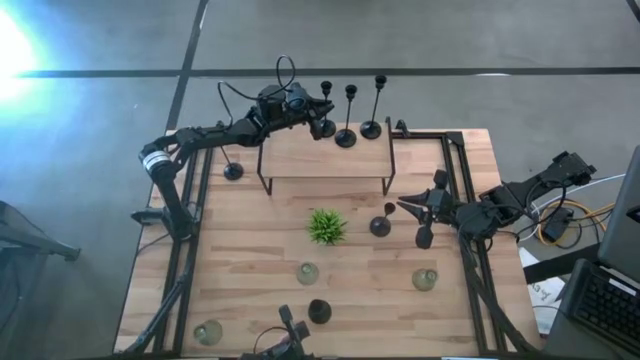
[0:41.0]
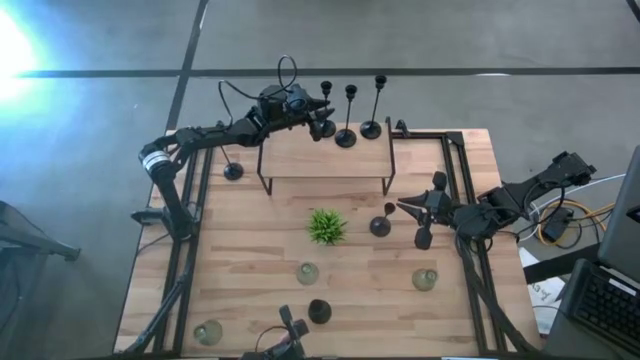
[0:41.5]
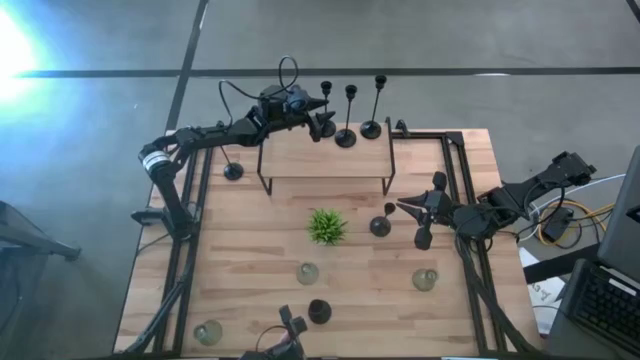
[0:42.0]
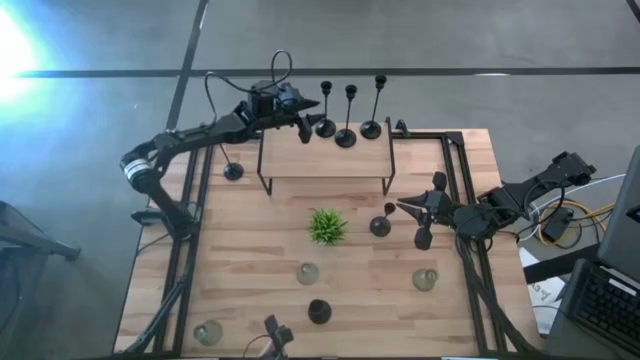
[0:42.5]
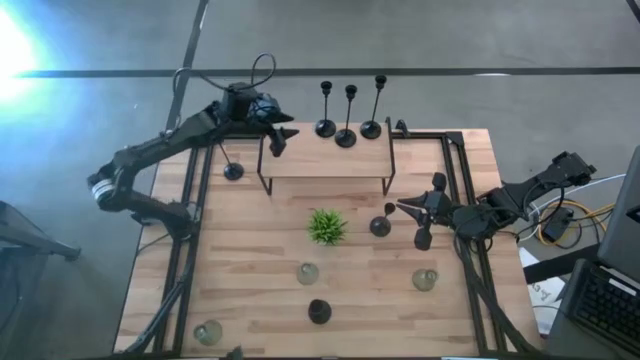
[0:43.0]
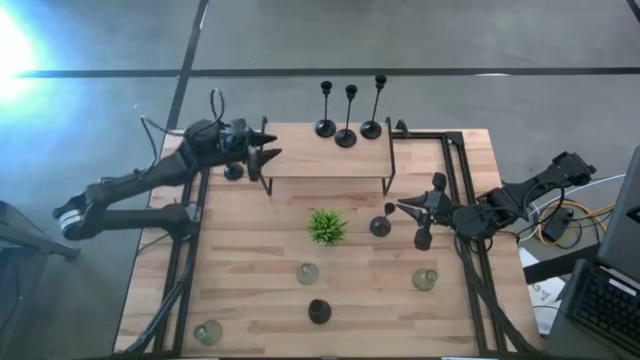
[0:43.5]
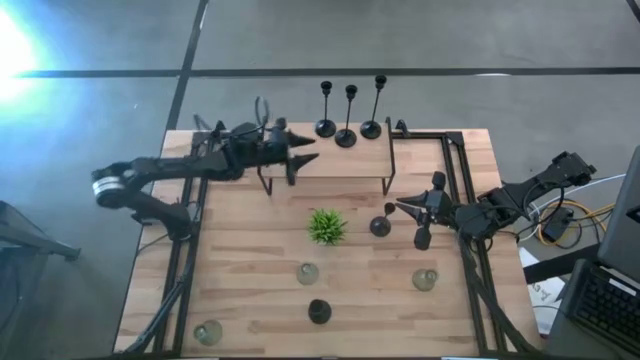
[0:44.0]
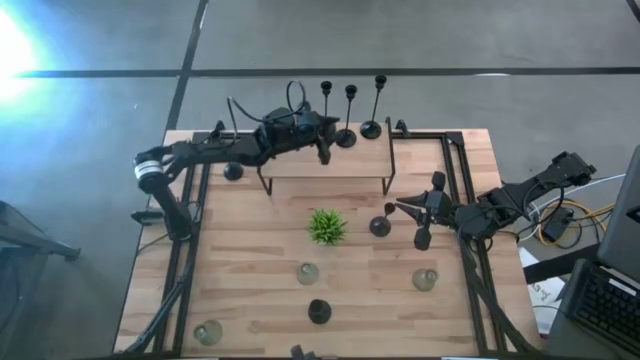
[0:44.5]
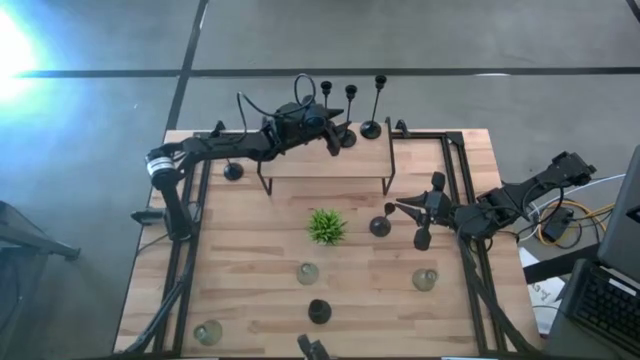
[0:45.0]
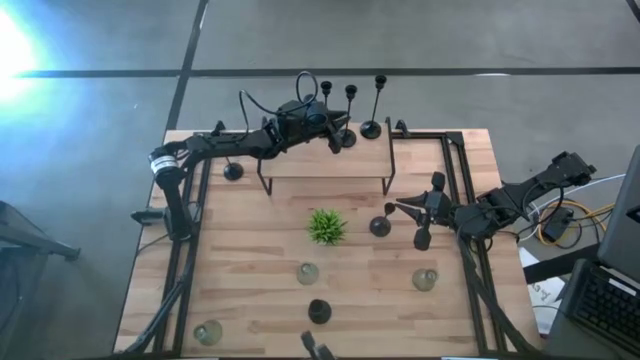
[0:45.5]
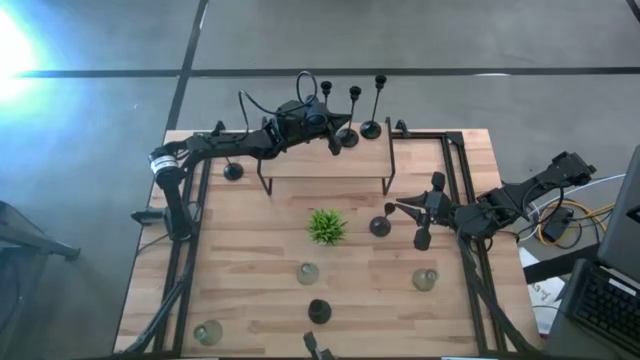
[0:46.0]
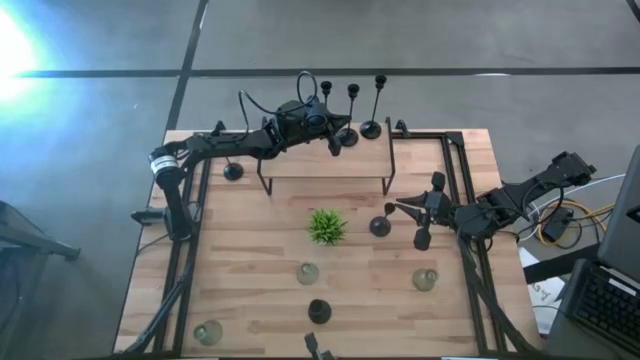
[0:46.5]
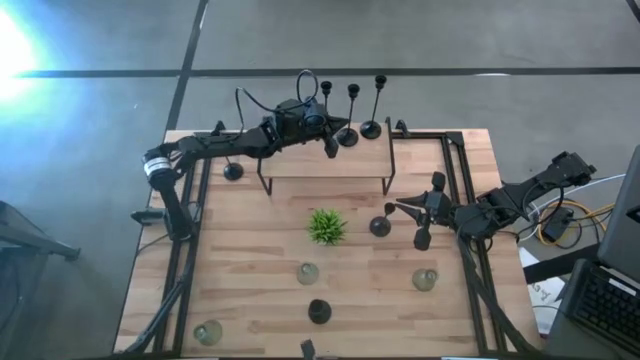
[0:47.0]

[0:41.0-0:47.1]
Task: Pick & Place candle stick holders
Adjust the large black candle holder on the shelf

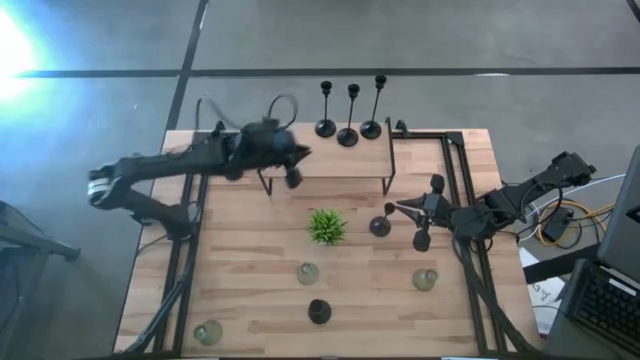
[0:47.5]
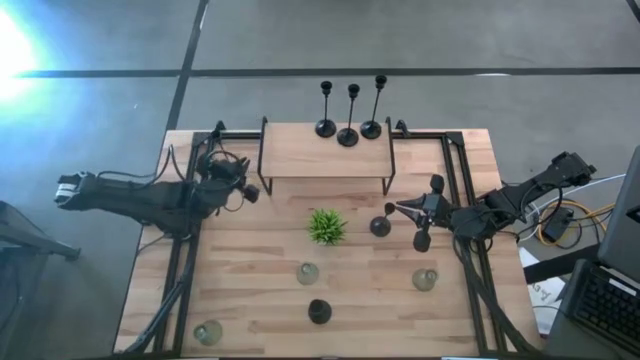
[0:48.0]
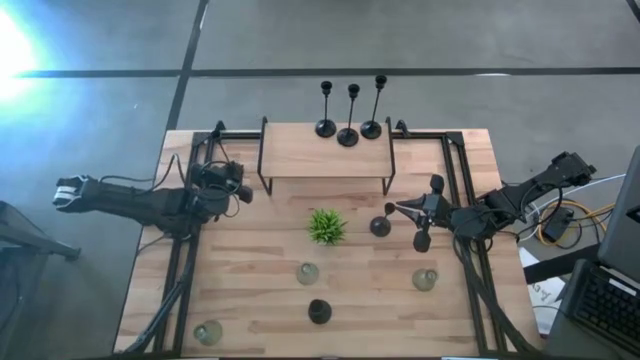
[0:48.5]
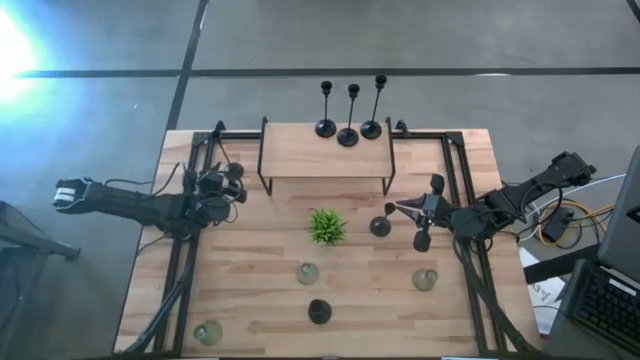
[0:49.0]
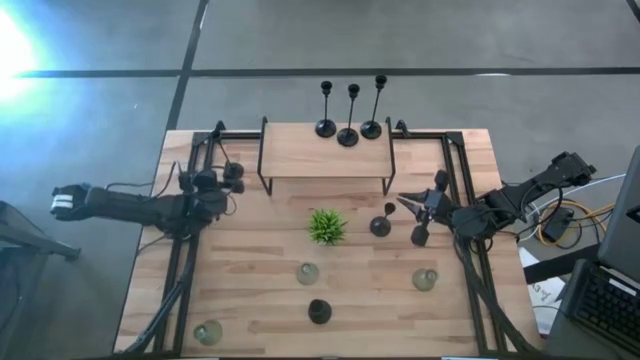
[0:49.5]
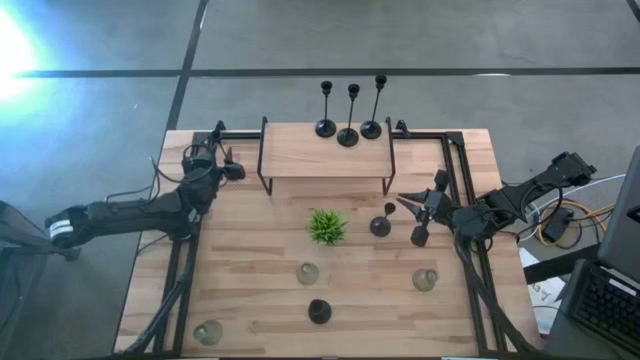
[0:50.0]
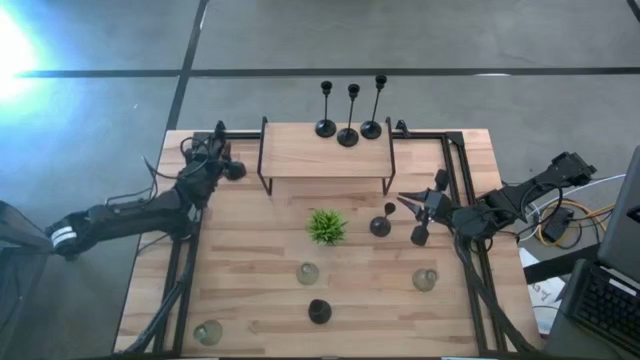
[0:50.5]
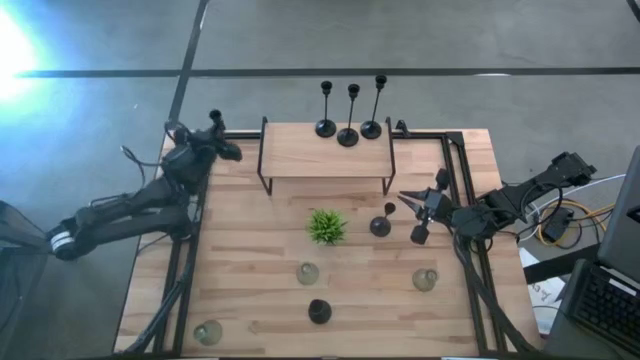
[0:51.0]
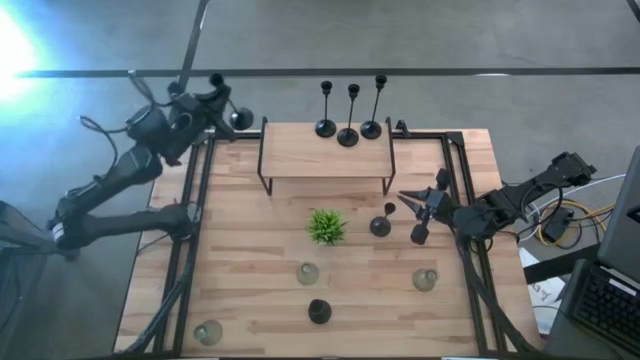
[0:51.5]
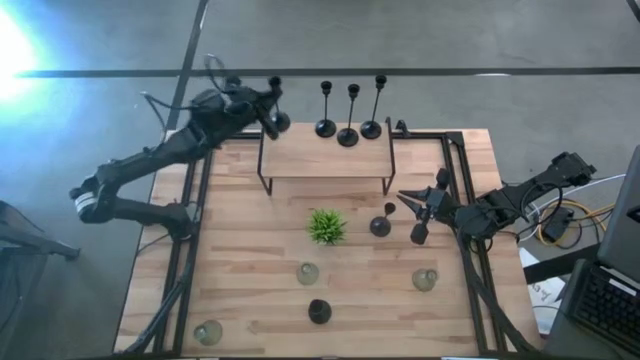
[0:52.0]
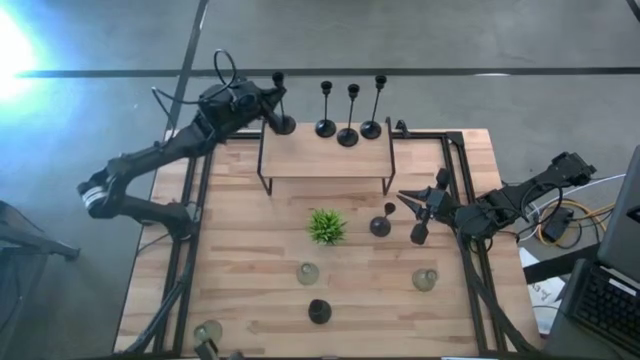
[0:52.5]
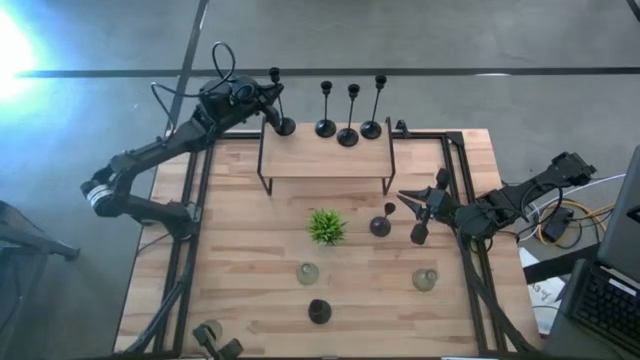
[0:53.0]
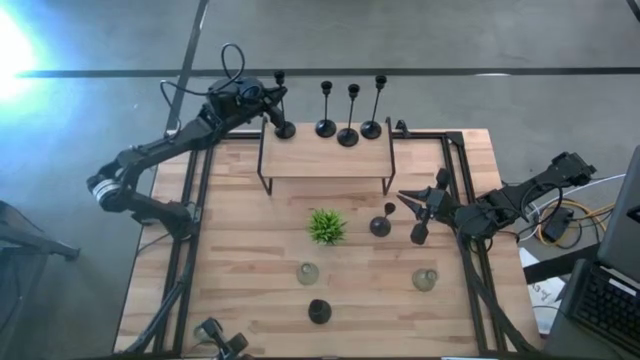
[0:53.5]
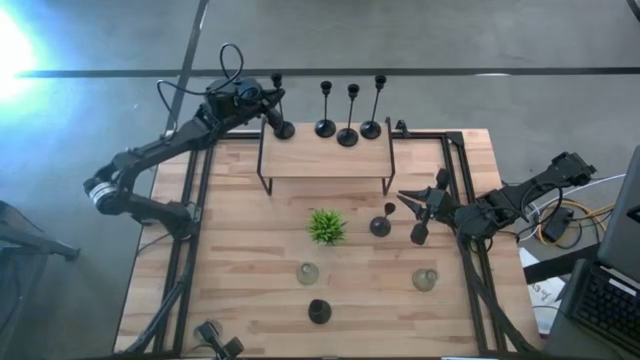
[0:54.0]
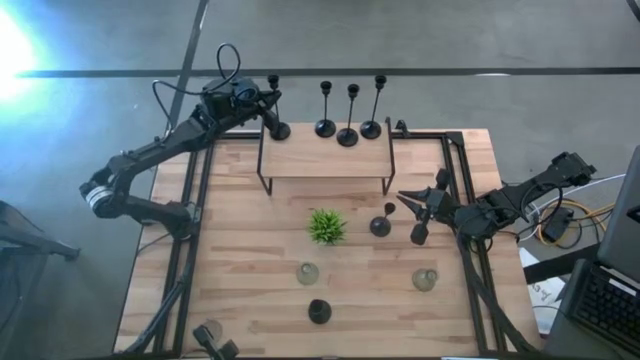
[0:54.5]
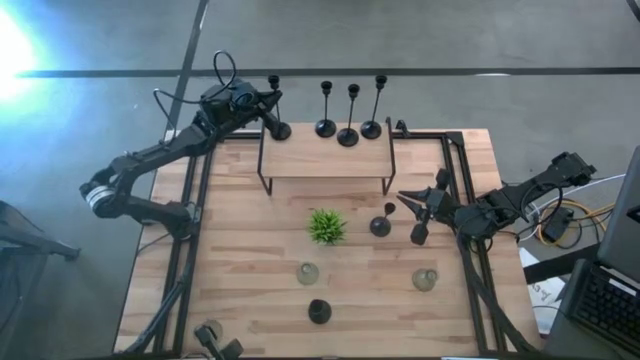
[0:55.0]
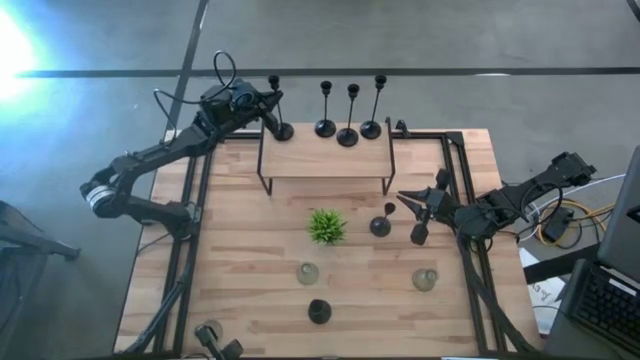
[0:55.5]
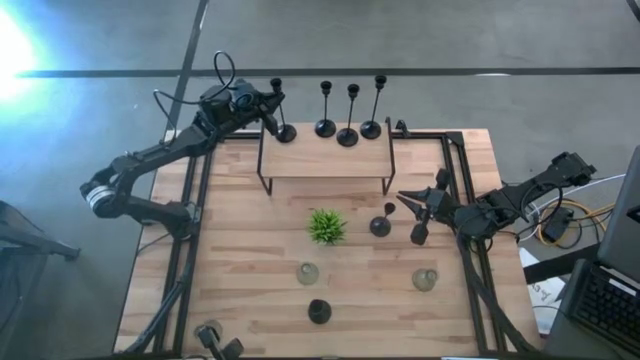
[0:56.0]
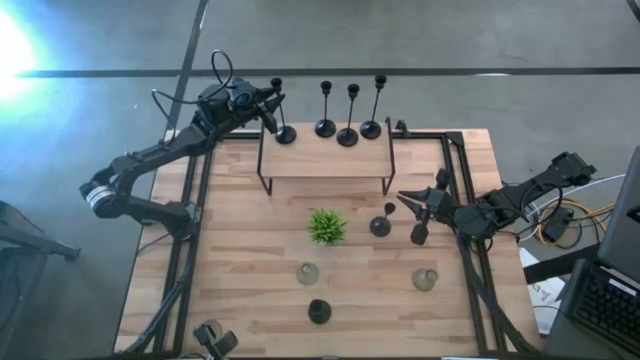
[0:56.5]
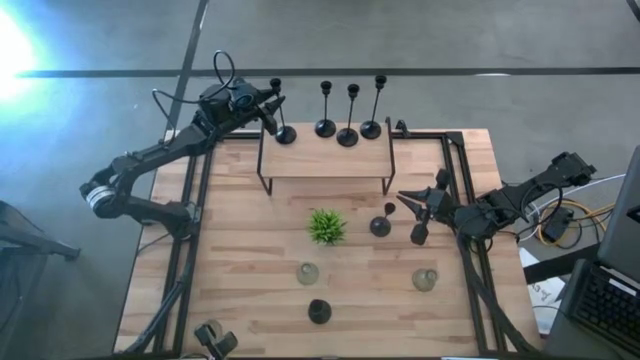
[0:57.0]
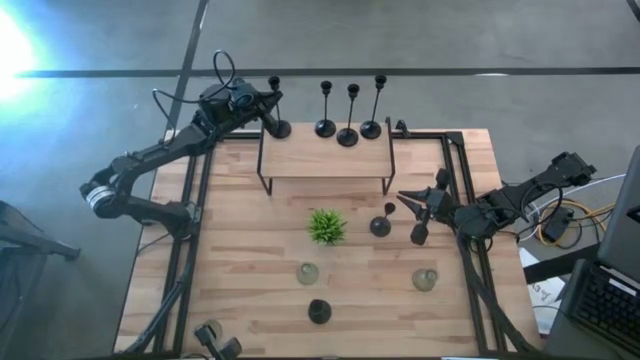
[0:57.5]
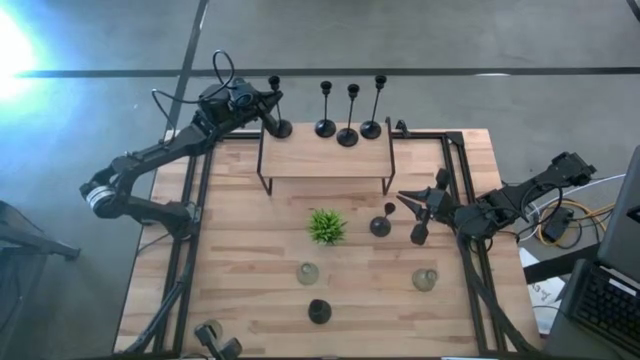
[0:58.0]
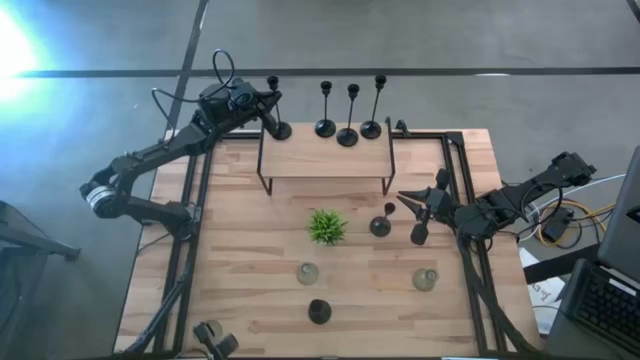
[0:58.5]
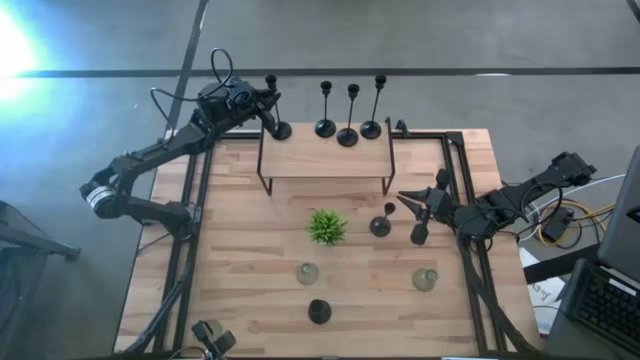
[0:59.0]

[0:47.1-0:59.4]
Put the large black candle holder on the shelf

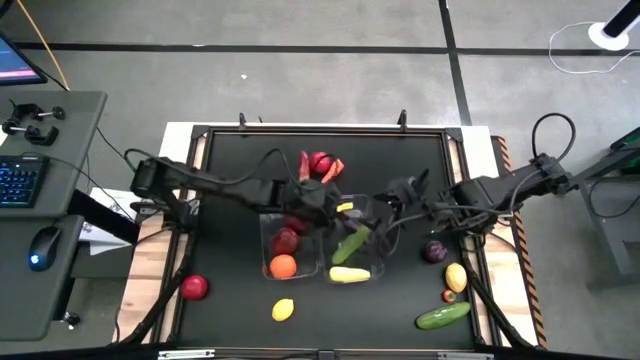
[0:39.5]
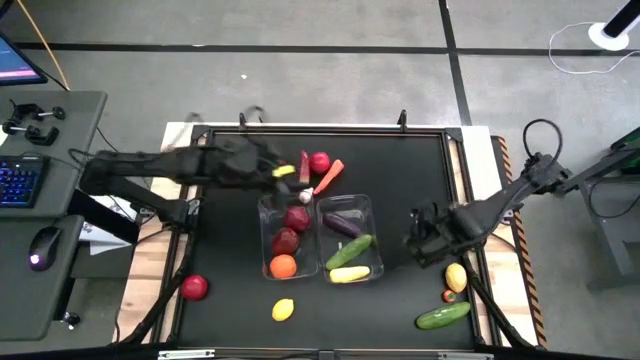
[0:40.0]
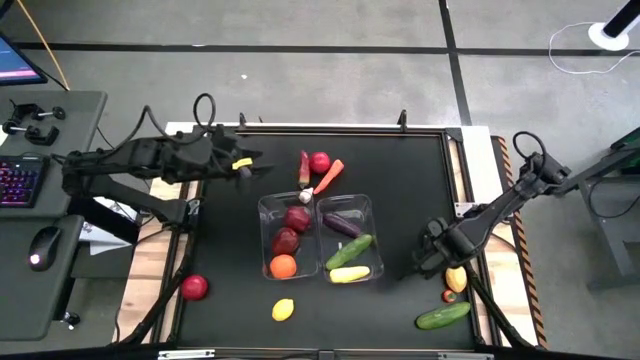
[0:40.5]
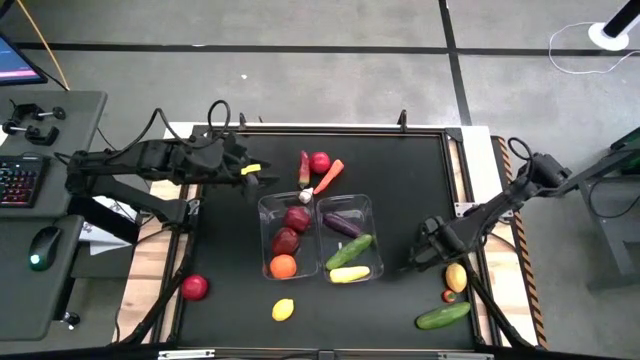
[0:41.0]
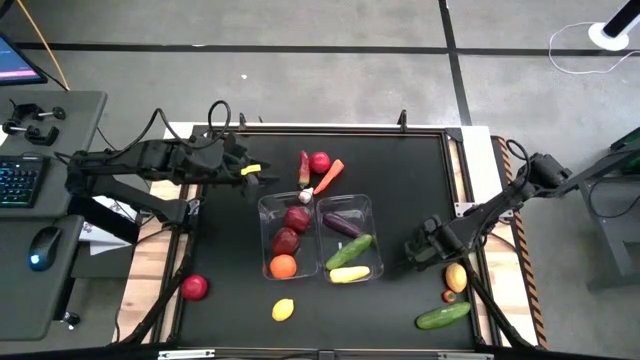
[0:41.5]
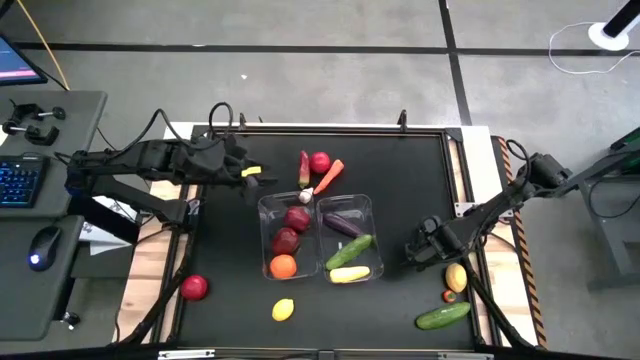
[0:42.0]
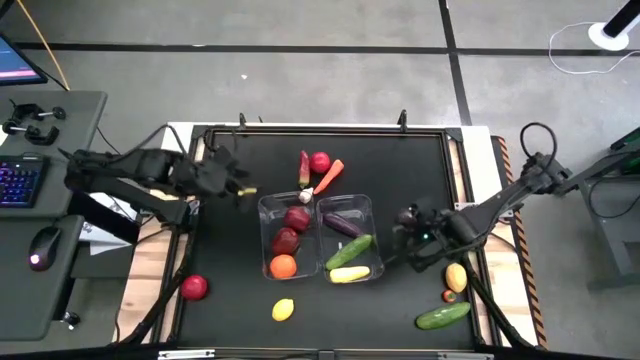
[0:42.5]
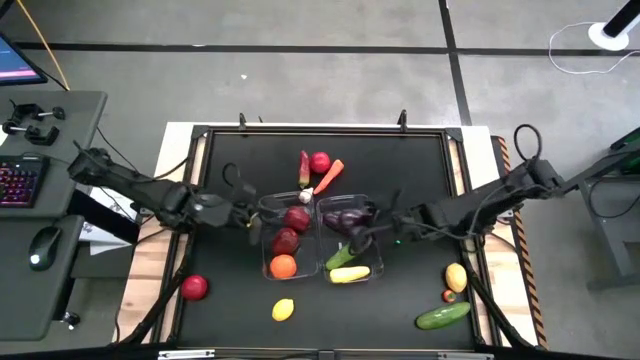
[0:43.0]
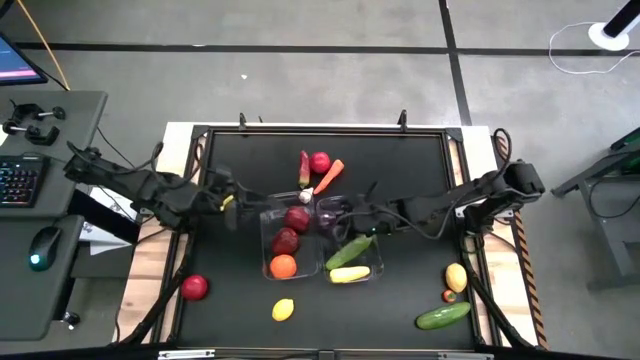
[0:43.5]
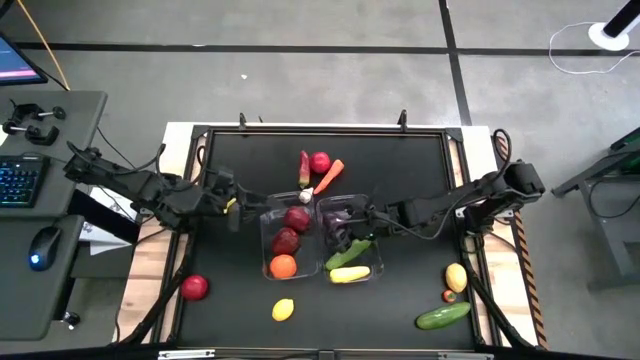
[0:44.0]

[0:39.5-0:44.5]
Task: Sort produce into baskets
Put the onion into the right transparent bin
